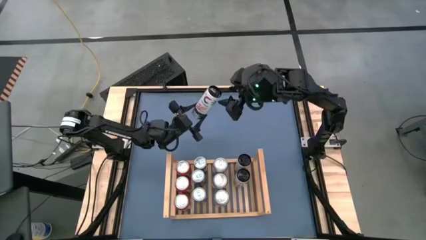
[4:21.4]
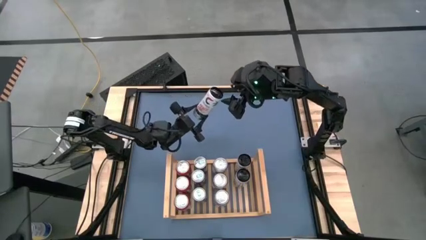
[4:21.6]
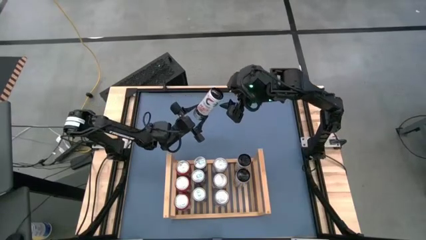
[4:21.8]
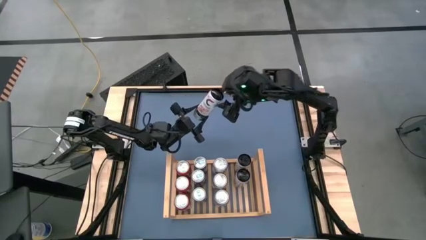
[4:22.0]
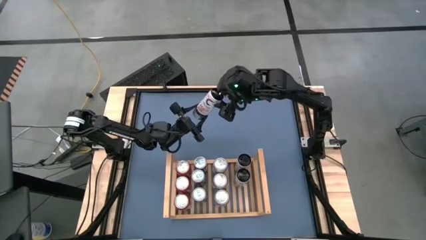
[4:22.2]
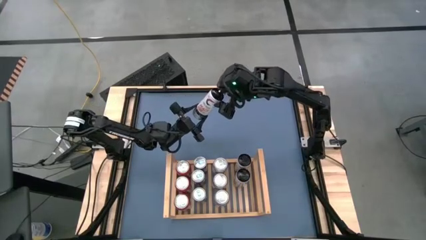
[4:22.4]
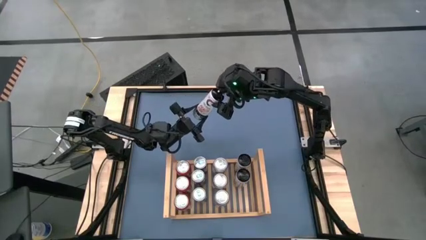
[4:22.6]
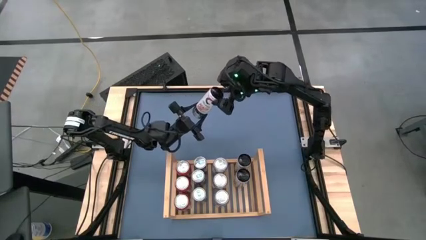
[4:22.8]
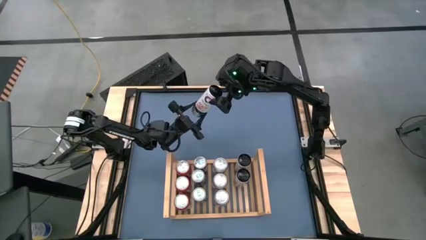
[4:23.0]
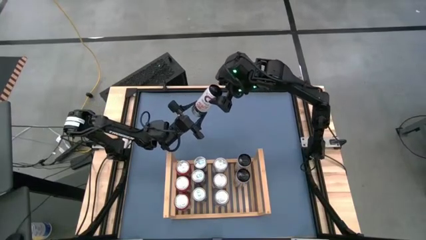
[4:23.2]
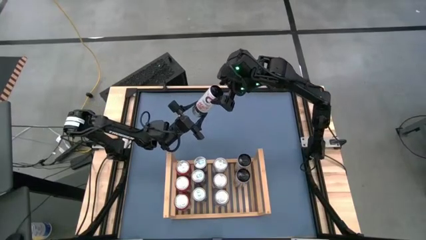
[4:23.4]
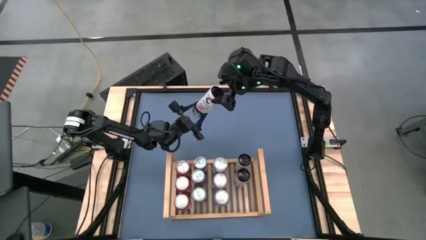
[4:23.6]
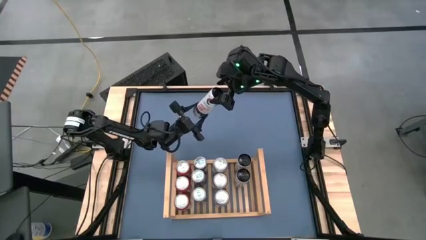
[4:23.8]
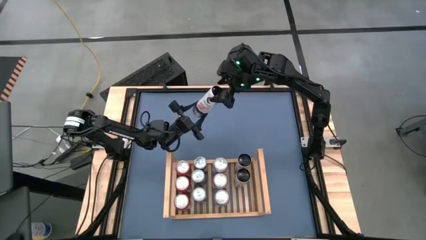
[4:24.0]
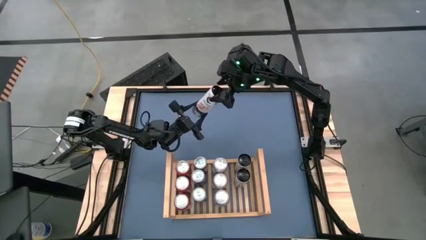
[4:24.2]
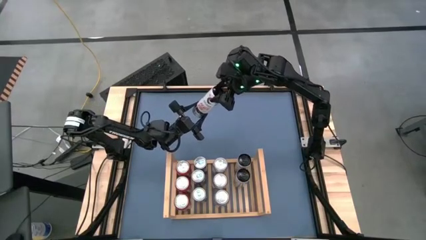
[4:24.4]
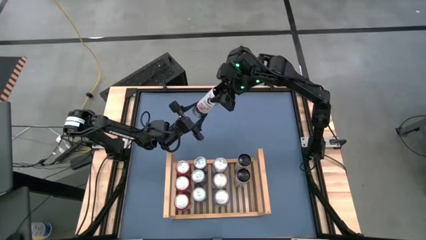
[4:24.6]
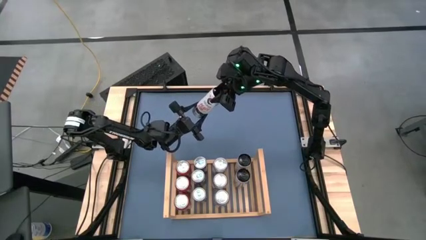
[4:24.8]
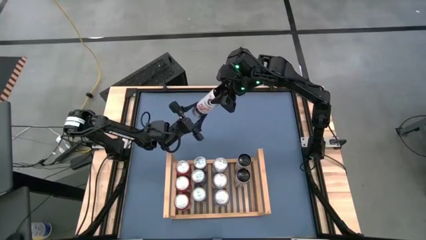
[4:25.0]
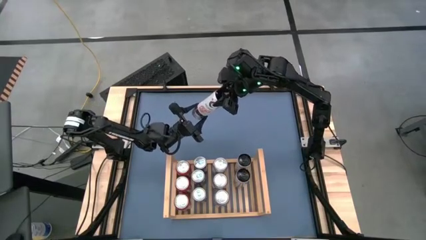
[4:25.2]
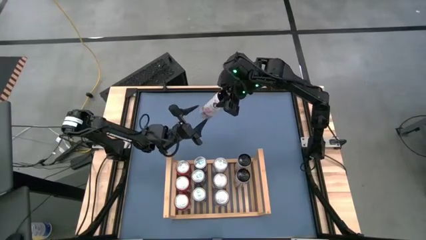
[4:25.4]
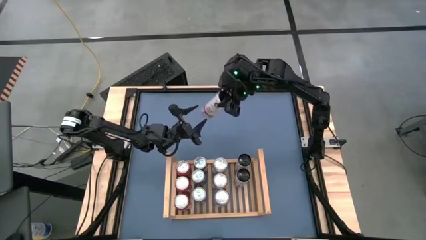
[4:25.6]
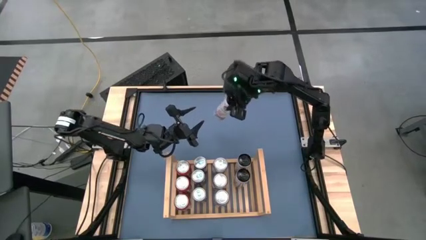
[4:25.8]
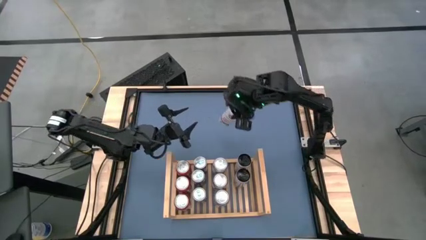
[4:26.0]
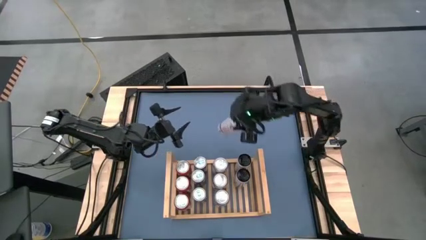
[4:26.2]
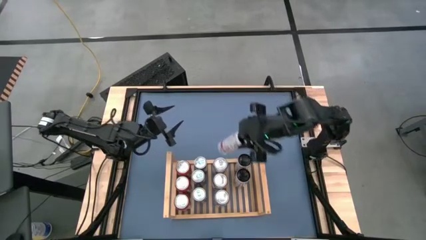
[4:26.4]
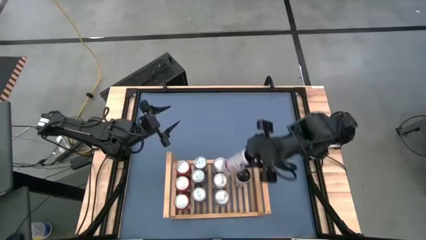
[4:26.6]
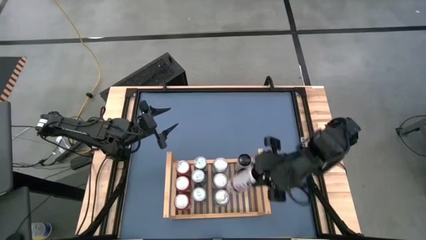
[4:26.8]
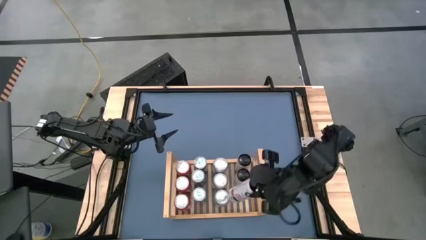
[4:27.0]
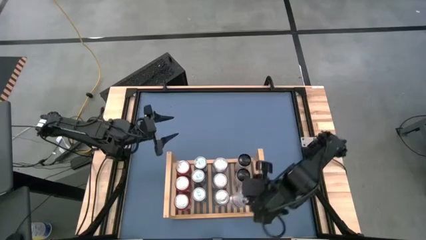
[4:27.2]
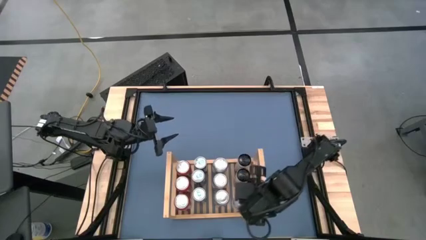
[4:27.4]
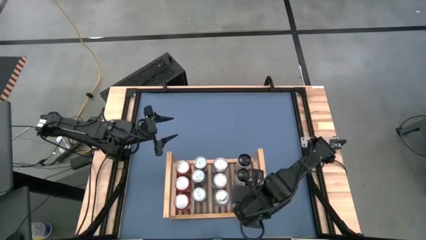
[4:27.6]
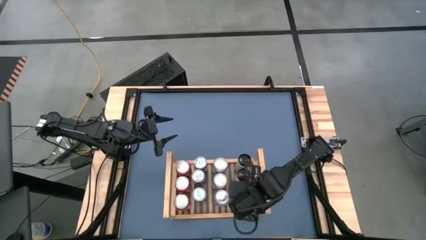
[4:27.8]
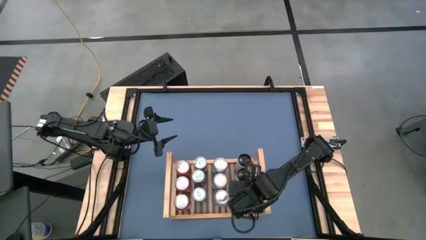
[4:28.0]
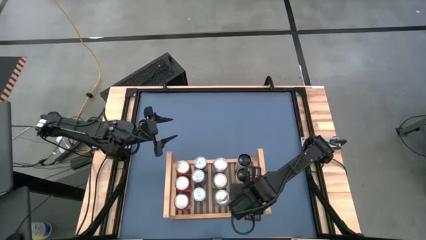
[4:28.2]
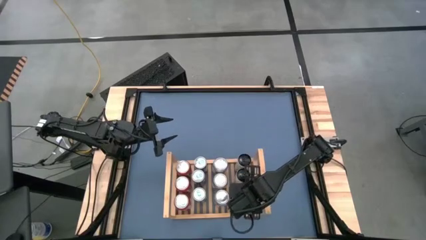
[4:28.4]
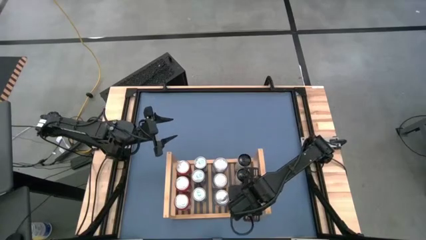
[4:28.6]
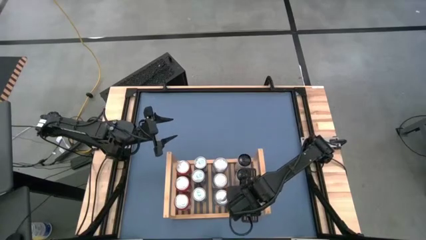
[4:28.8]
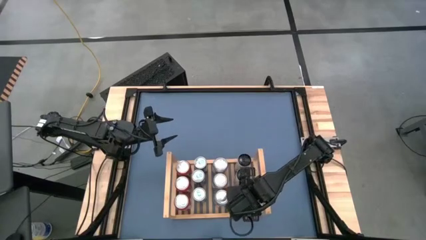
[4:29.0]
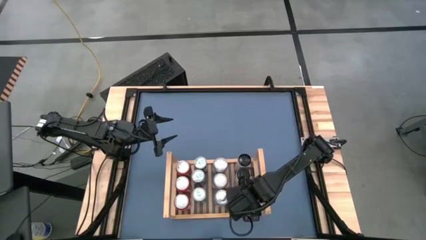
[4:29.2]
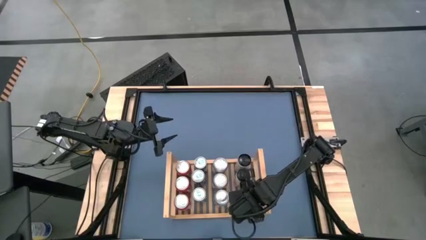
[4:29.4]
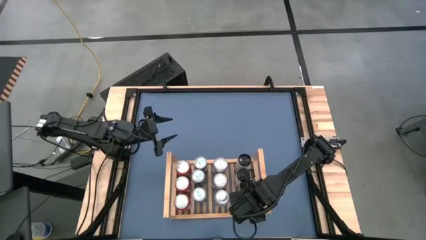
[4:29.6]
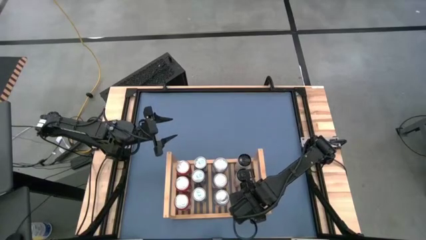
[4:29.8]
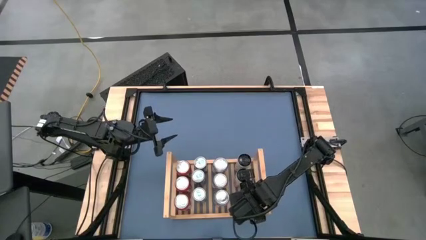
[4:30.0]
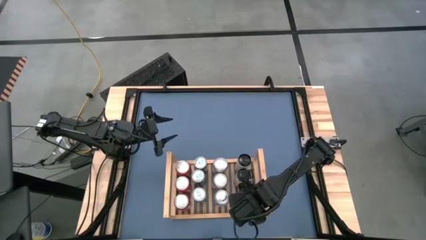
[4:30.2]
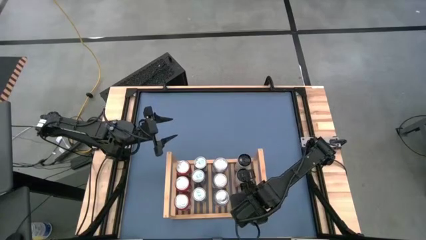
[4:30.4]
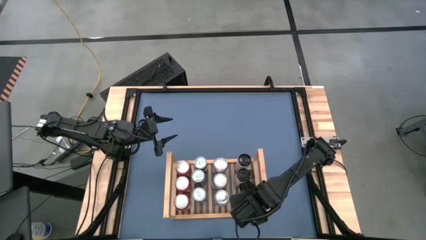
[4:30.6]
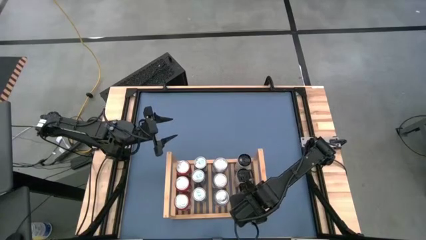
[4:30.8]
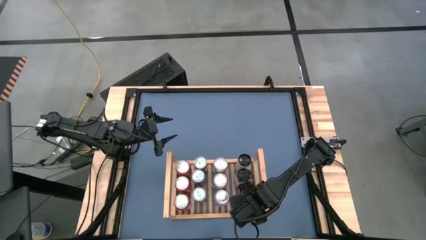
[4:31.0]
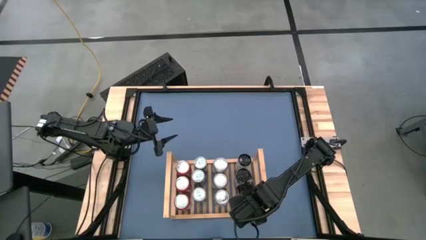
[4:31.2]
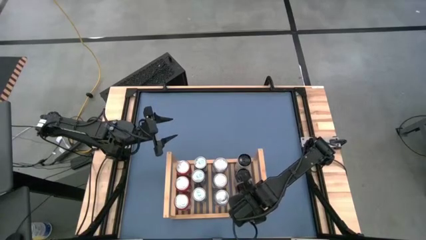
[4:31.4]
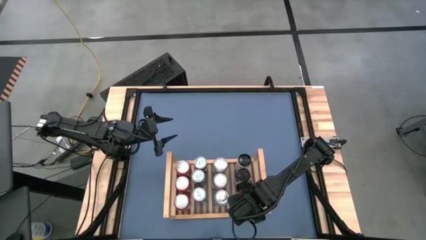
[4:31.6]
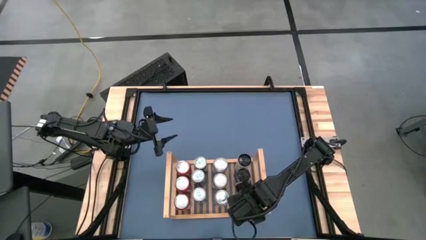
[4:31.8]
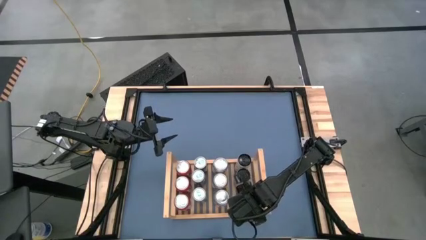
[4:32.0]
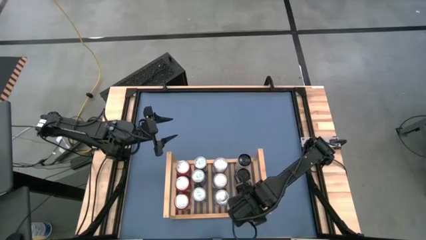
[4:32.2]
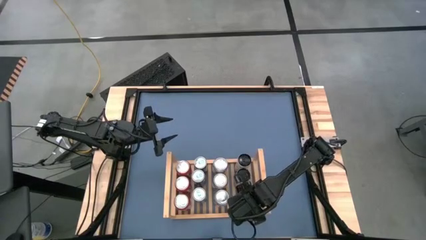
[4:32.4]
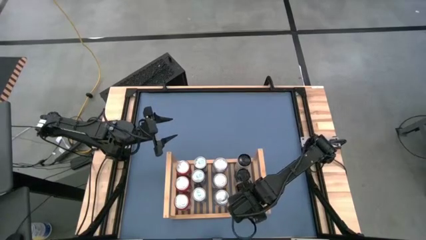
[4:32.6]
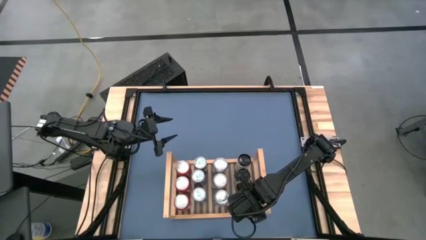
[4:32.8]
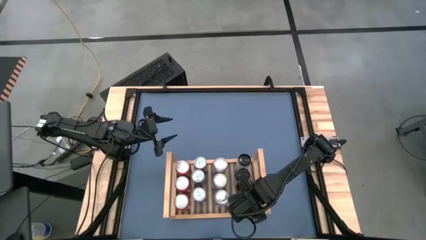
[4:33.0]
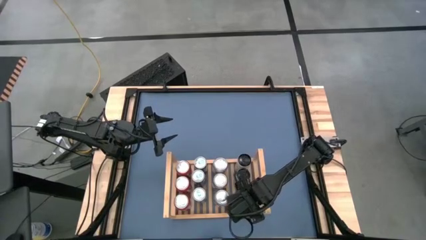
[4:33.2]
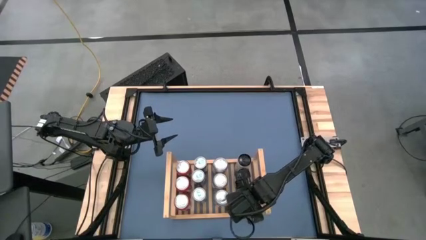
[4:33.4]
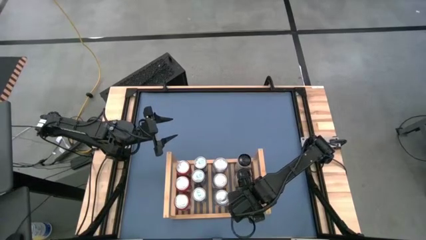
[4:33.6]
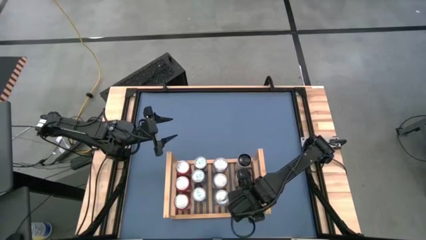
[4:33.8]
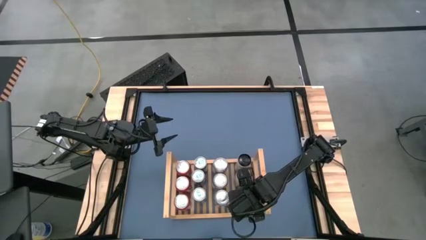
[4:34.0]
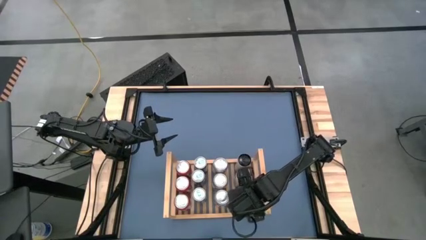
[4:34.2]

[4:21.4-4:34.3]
Task: Place canned beverage on shelf
Put the white-pink soda can on the shelf aligned with the other white-pink soda can
